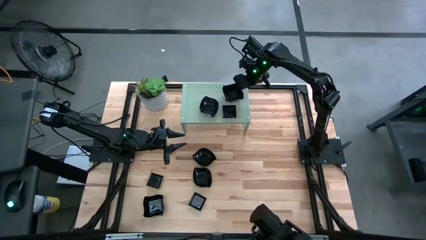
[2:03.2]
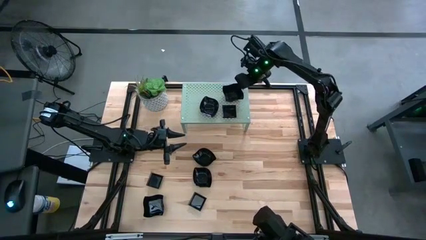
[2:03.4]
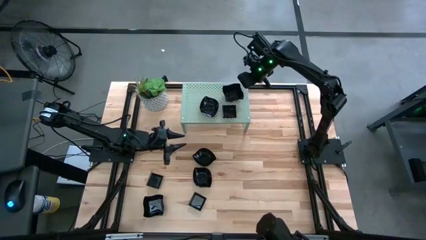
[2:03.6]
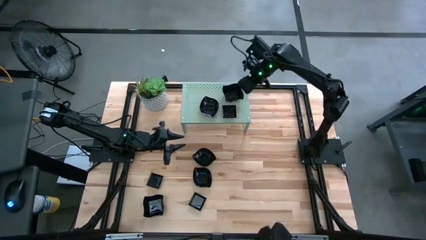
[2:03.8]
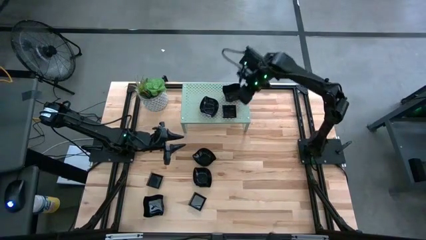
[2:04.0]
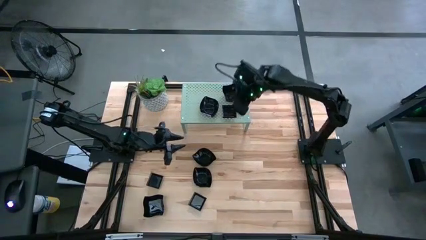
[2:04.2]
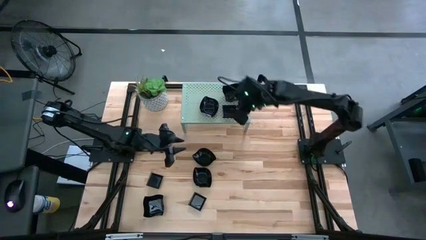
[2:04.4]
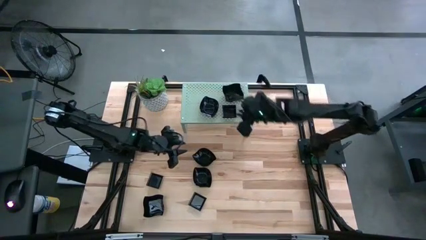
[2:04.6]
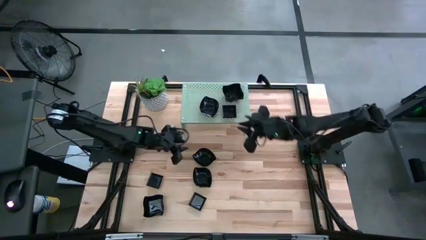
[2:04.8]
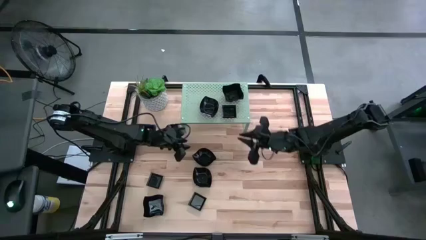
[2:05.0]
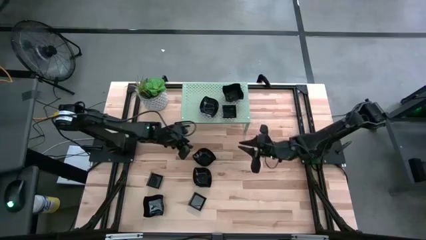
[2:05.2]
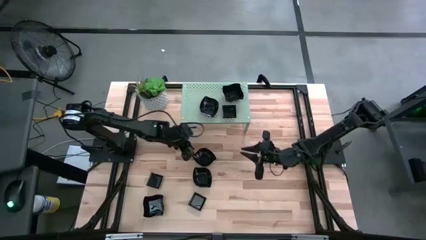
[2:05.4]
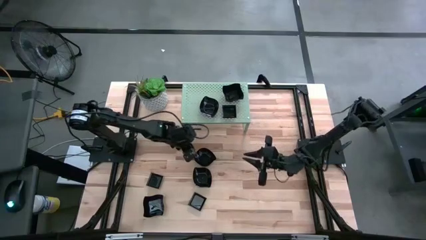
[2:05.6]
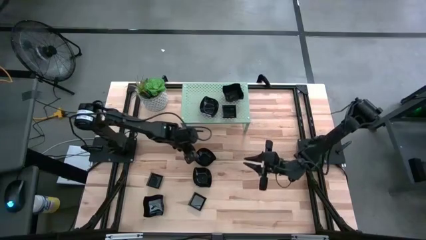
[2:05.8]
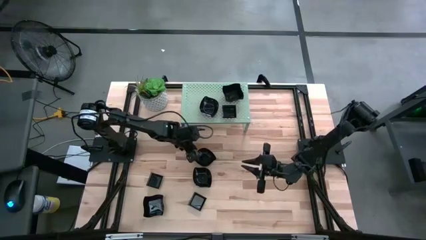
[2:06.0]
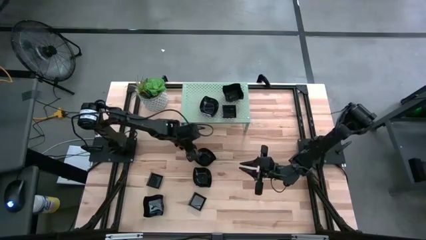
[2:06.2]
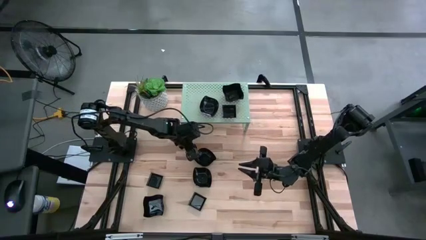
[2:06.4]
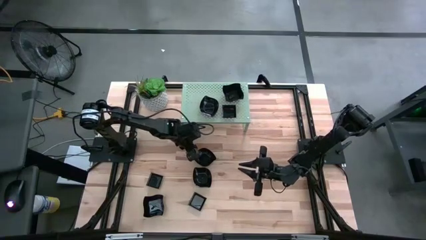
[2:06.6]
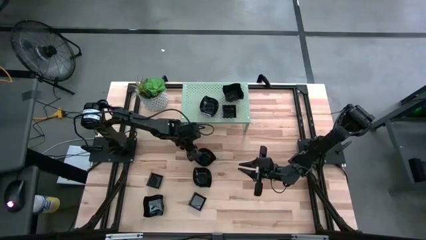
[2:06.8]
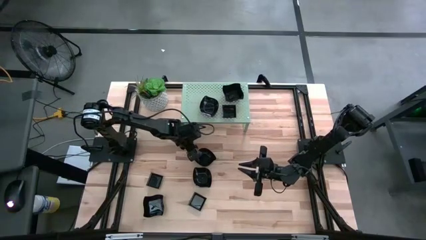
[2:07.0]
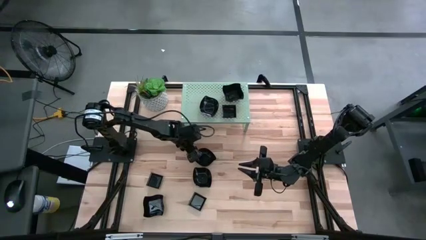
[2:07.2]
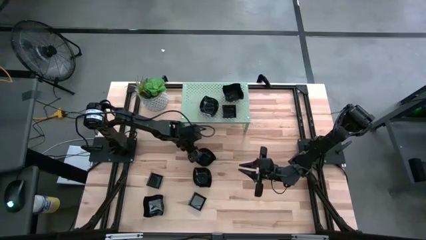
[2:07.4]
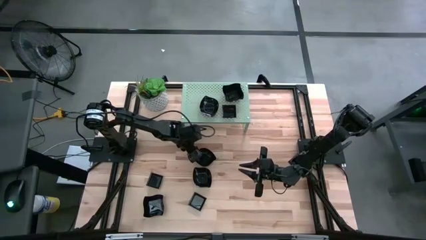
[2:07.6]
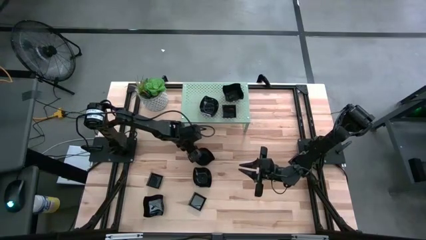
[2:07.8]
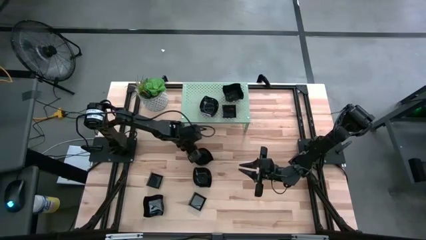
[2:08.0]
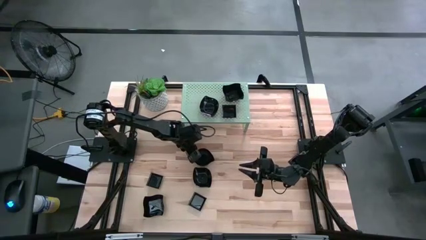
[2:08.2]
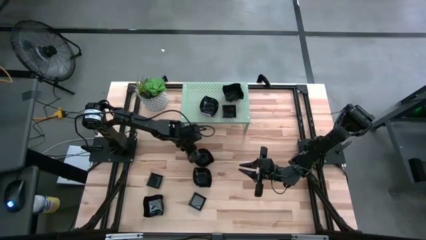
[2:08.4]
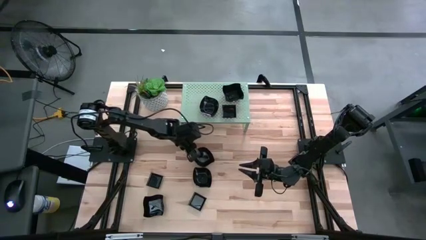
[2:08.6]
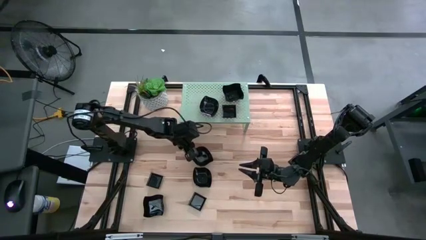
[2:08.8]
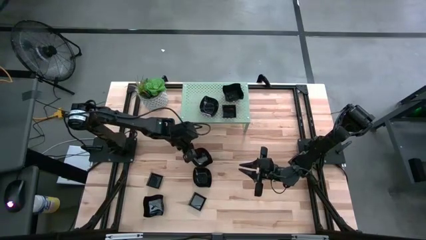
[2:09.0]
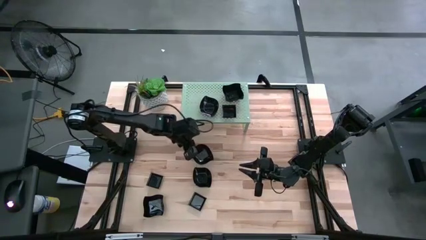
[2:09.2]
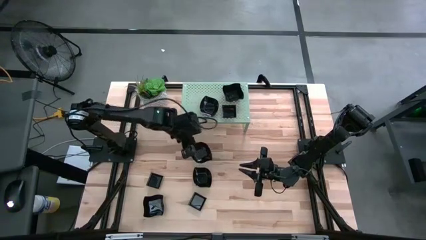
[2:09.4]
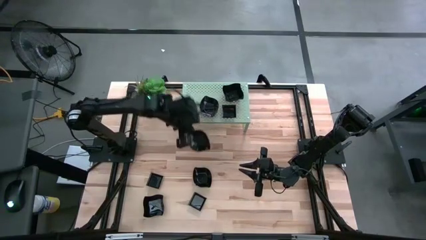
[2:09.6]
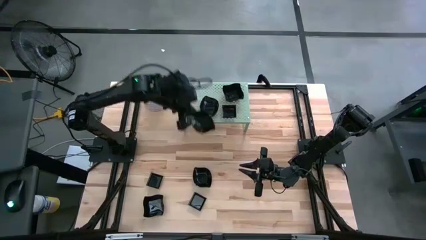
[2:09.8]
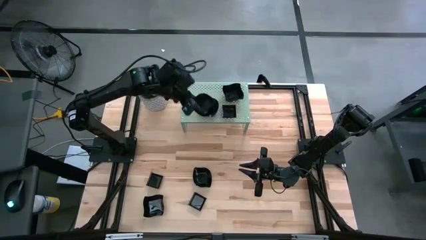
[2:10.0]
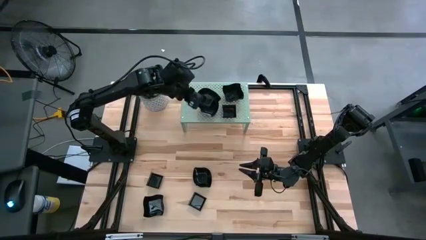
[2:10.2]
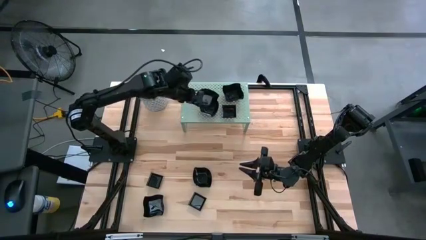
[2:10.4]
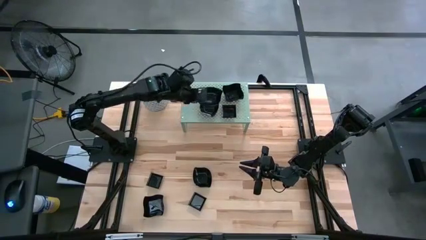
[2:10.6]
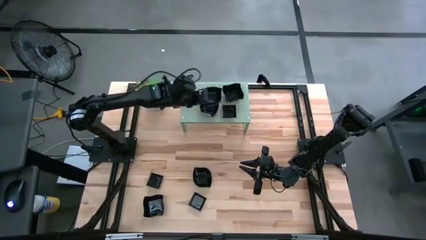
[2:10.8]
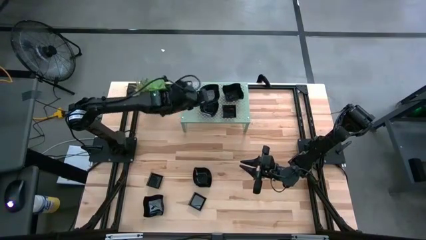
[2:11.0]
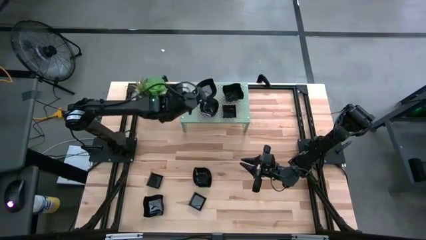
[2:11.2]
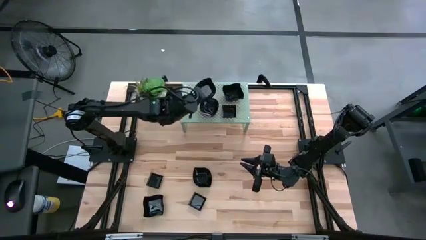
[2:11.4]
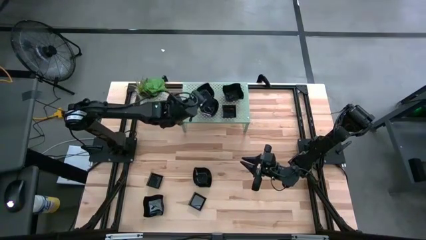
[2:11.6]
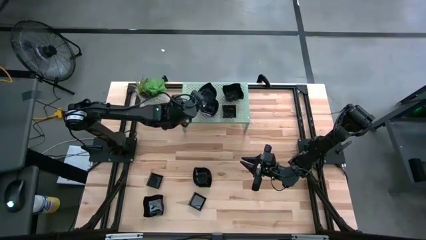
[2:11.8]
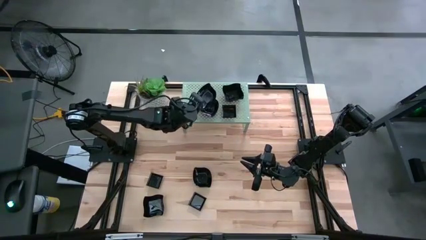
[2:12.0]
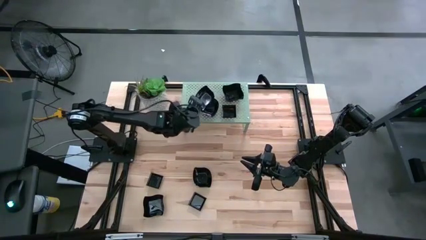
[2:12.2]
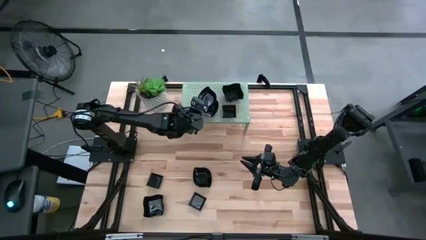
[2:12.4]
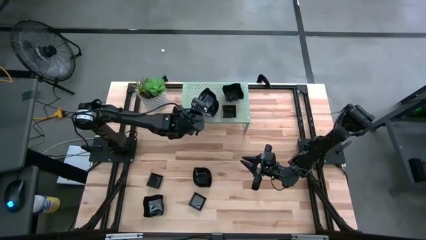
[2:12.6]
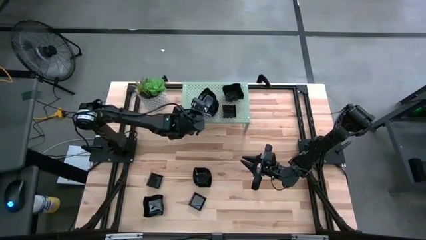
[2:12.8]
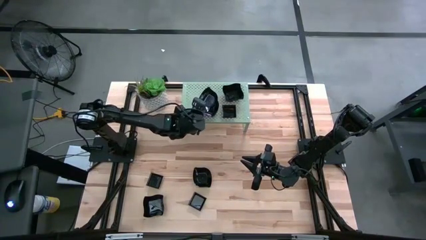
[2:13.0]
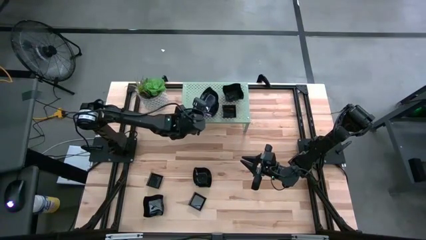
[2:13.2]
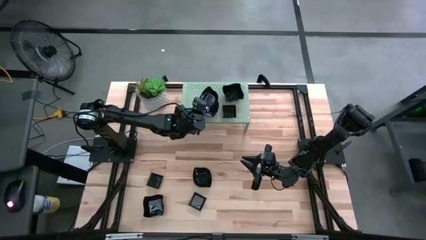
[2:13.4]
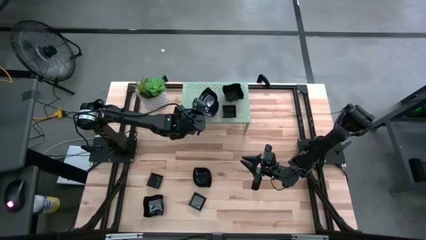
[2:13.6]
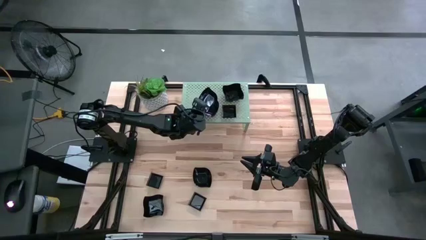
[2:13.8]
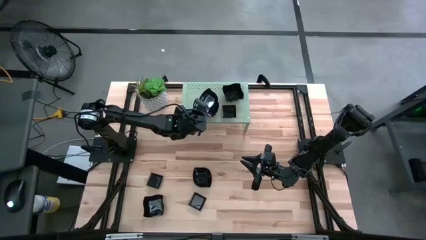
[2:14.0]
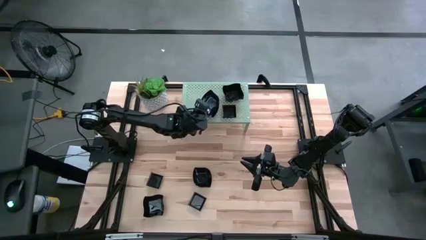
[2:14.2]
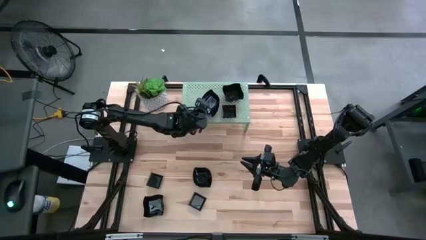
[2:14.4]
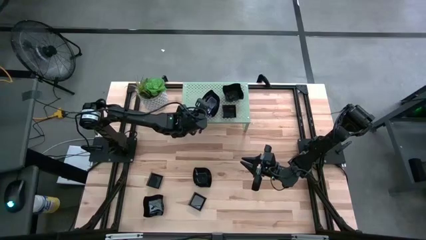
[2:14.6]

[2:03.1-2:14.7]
Task: Pick & Place Mini shaped plates
Stack the leaf shaped plate on top of the leaf shaped plate on the shelf

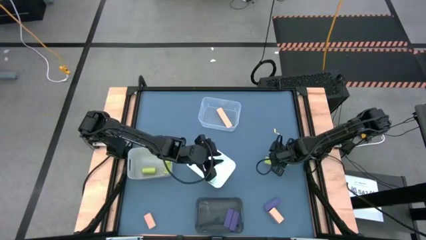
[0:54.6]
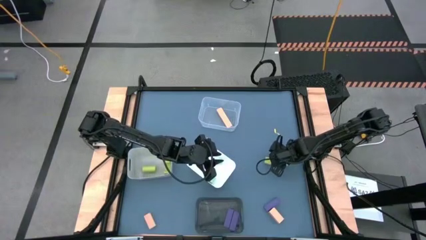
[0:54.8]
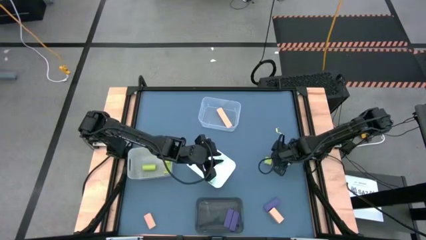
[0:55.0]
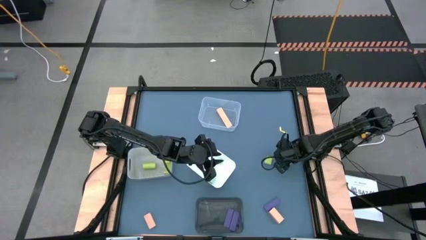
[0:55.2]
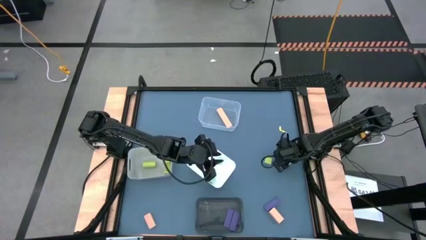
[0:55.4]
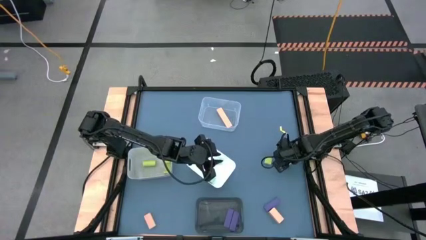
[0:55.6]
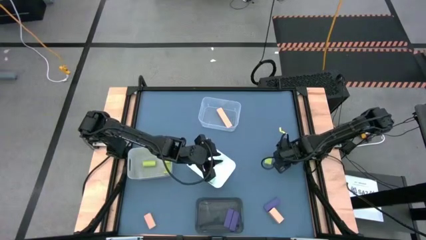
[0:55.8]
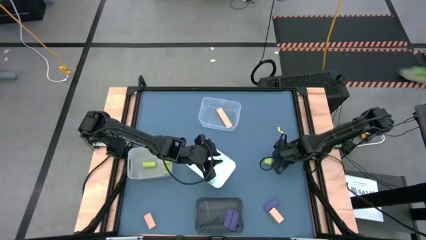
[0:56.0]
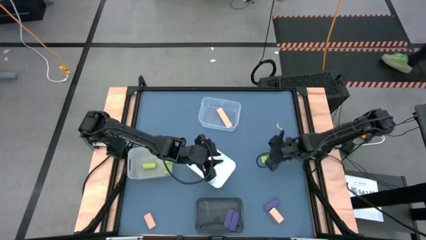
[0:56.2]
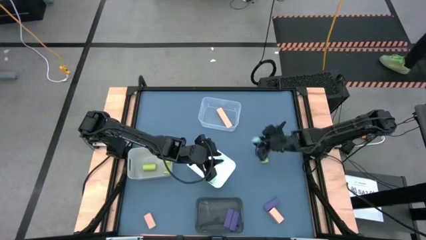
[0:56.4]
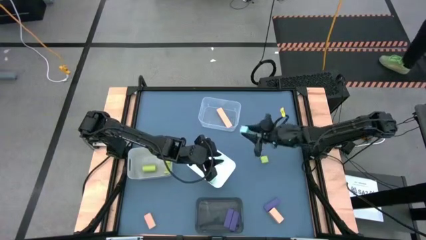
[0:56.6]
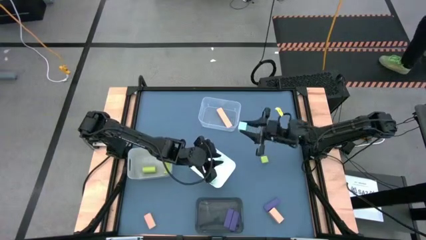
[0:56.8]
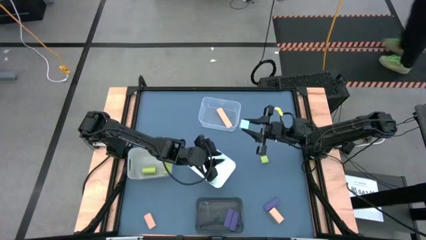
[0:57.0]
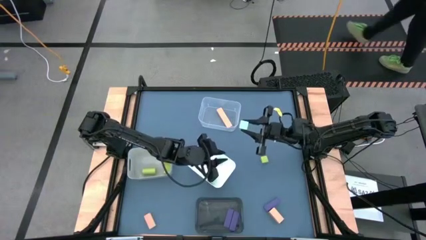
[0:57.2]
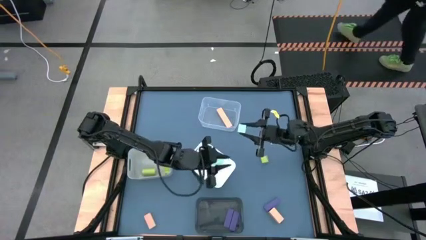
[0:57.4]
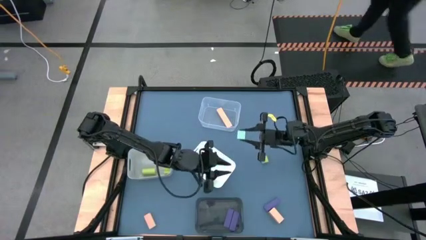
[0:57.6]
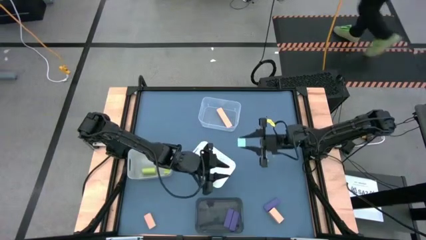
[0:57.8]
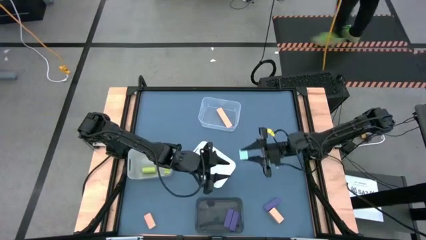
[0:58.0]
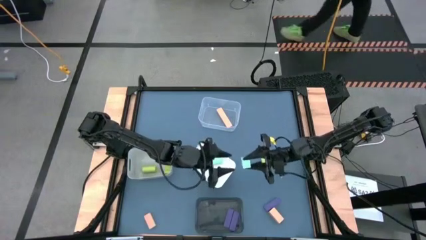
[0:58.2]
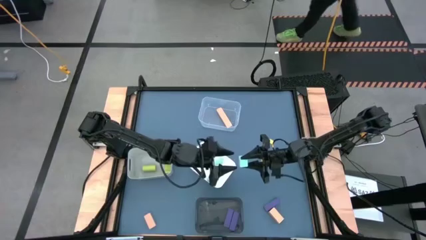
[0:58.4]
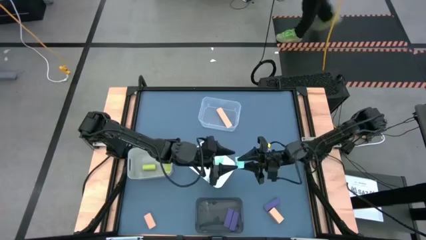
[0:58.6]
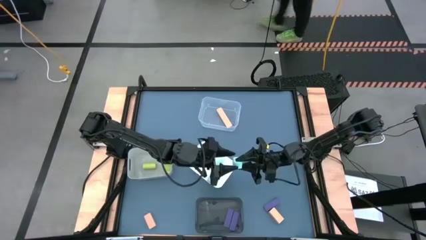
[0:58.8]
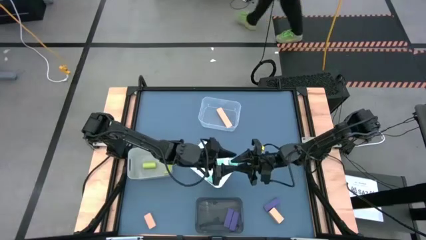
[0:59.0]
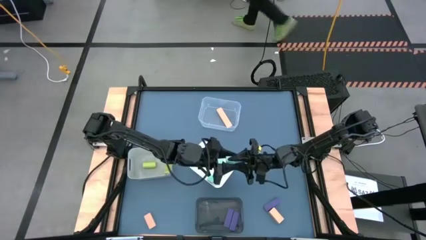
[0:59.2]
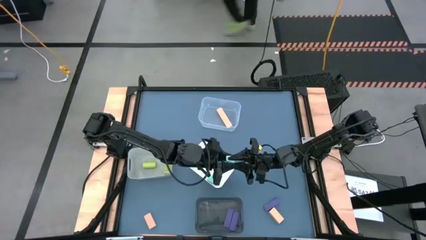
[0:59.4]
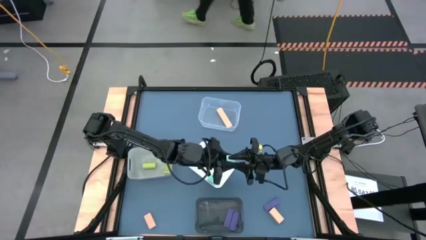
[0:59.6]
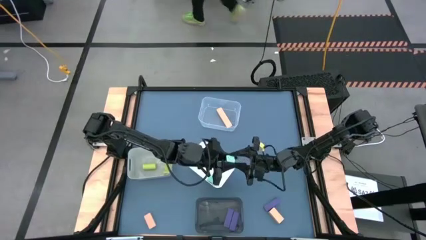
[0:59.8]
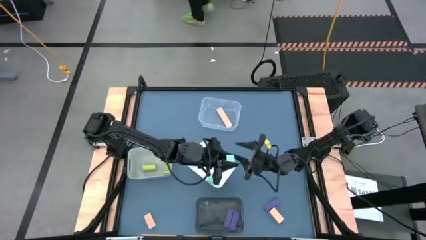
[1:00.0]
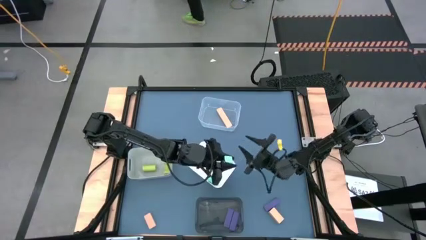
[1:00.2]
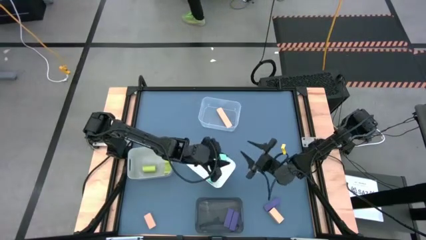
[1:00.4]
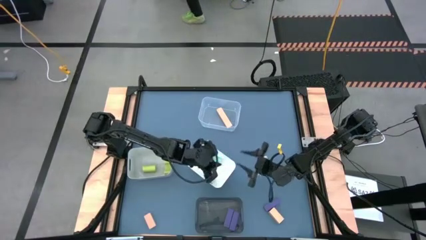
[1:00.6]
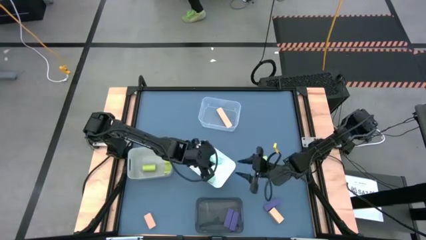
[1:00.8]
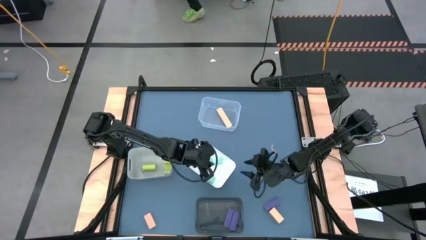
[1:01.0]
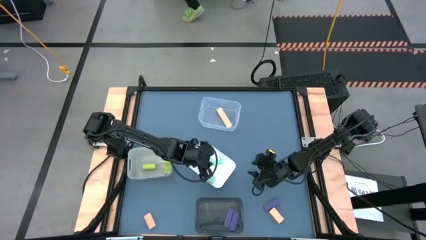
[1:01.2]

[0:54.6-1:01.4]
Task: Sort & place blocks by color
Put the blue block into the white bin
